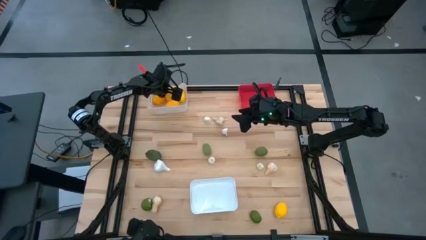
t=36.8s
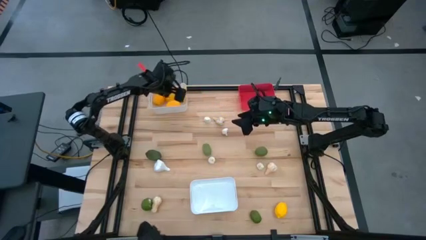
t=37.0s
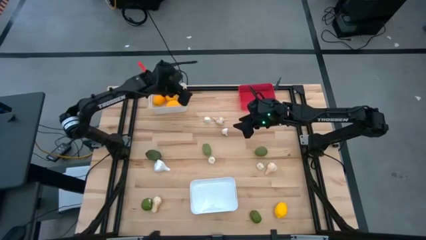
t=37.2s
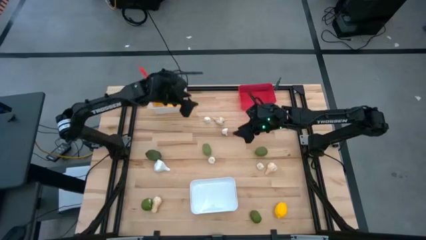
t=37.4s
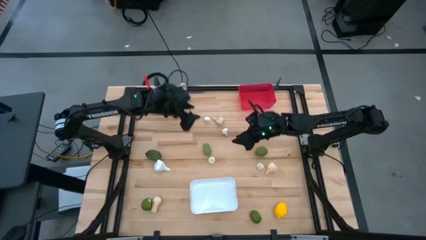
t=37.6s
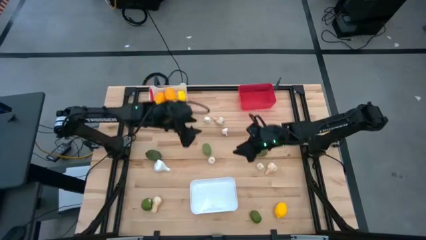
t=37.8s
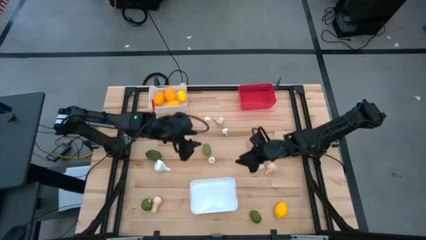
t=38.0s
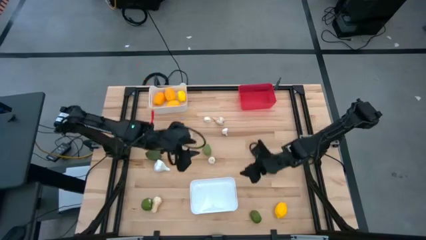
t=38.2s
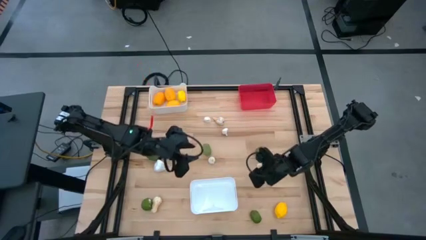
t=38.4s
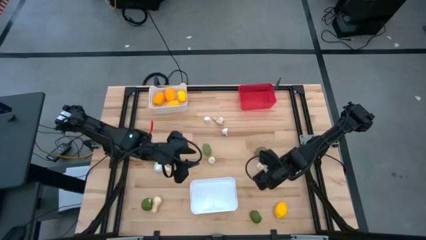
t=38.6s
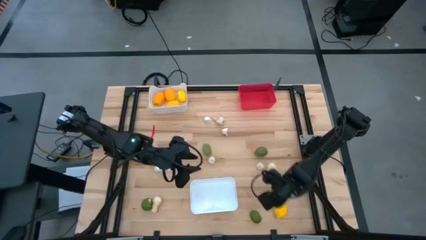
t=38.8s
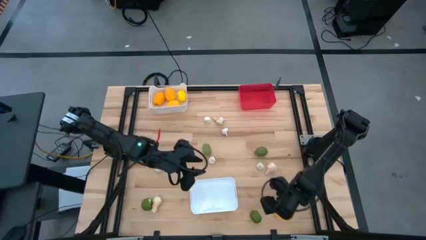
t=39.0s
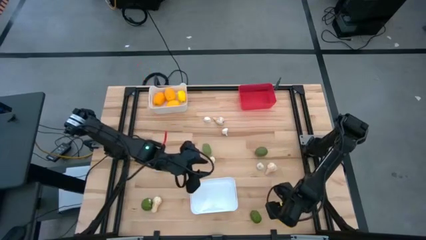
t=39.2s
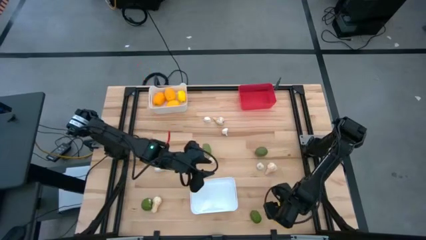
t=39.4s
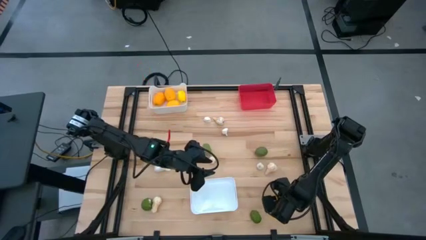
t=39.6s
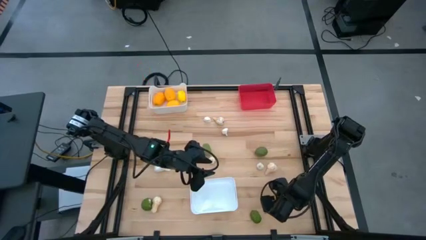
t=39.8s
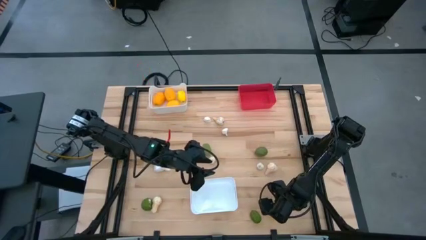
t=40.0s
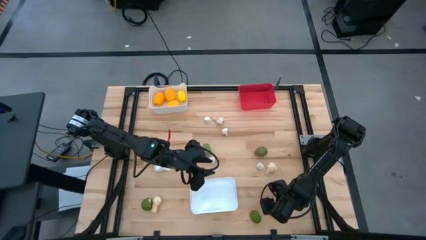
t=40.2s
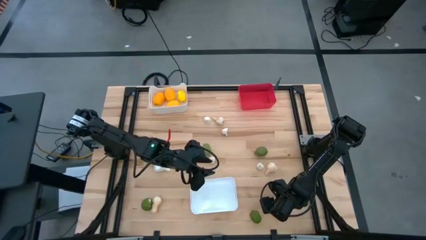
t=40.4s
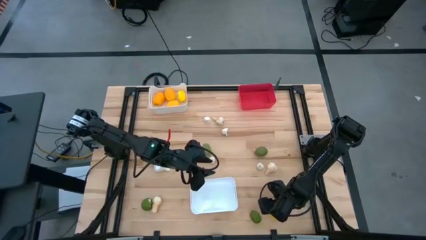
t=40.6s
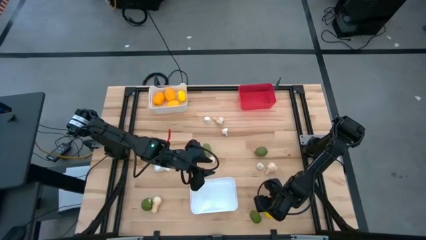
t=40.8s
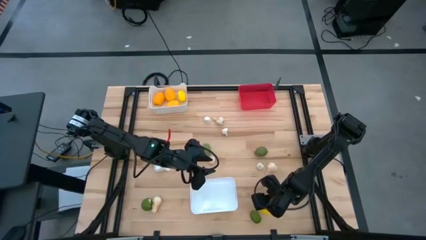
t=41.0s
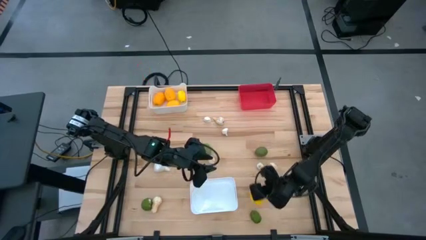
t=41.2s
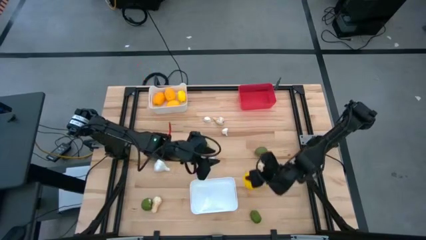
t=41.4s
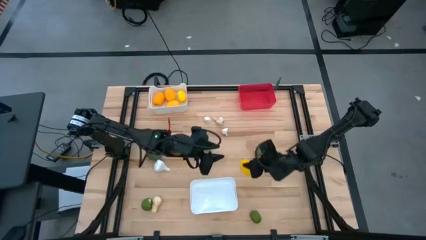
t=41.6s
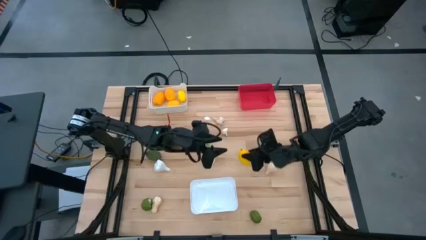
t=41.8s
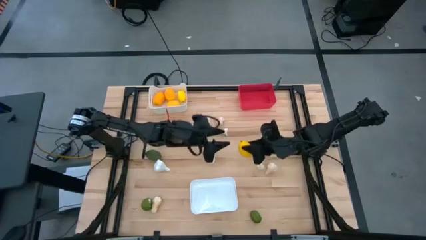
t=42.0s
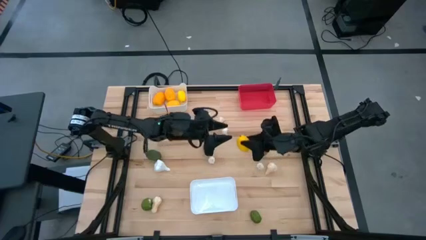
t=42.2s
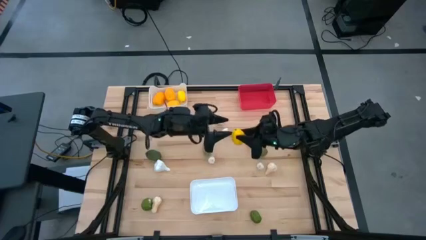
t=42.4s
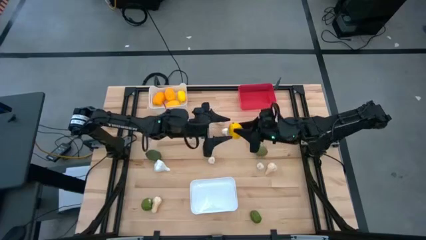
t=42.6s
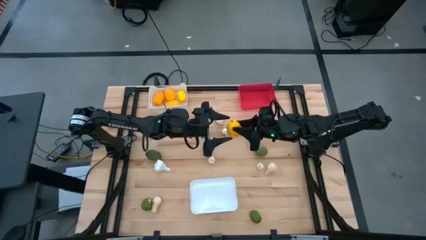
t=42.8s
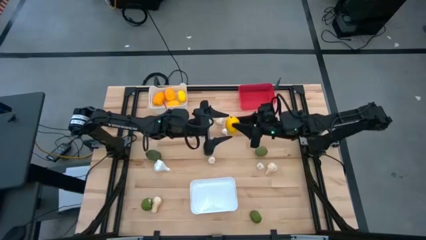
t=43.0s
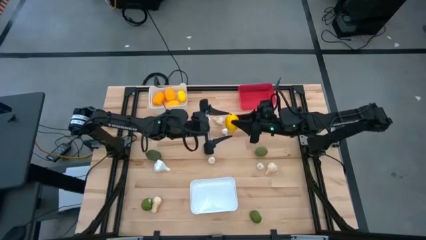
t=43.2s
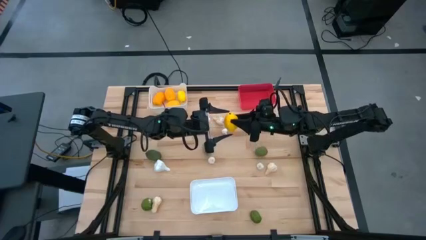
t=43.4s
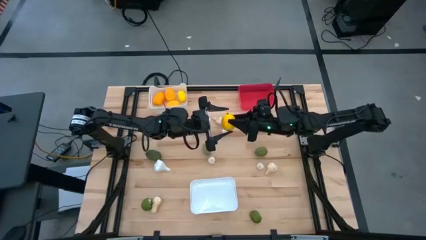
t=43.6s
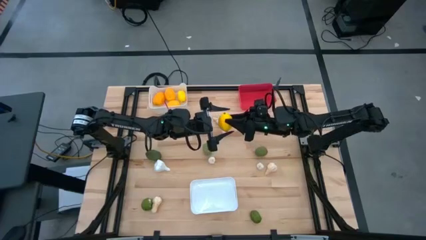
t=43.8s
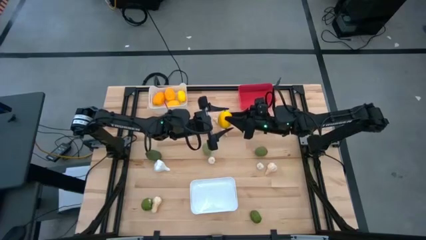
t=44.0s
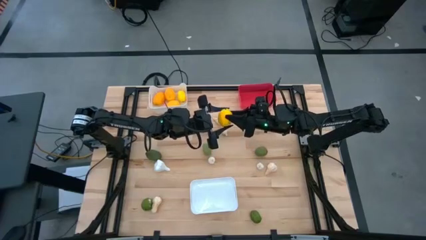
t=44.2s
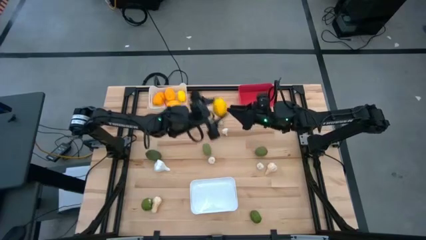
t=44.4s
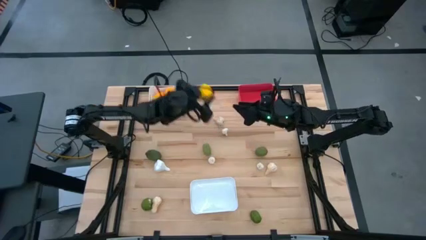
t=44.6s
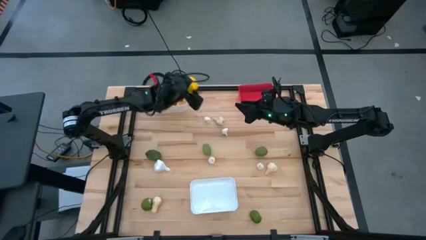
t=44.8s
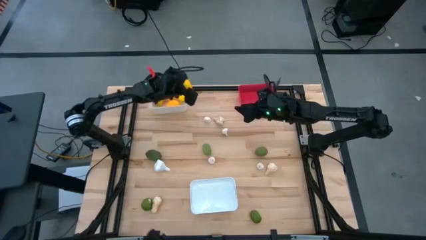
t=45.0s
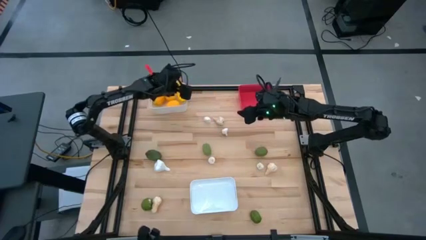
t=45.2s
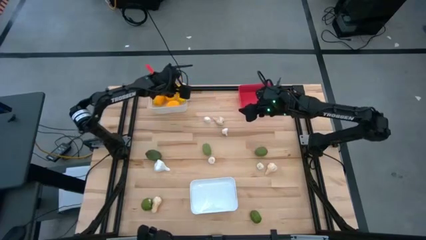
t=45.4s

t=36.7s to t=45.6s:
Task: Sort produce into baskets
Put the yellow lemon into the top white bin

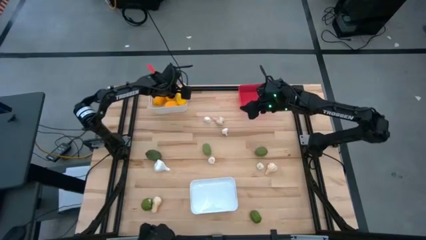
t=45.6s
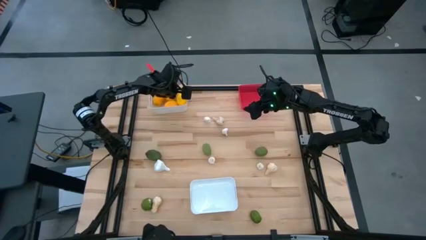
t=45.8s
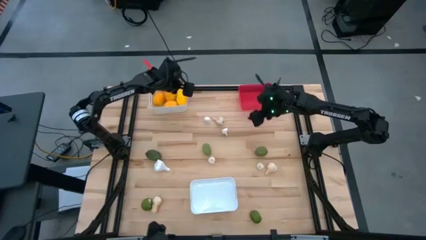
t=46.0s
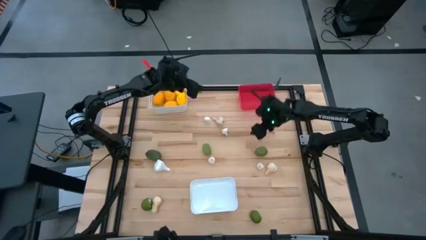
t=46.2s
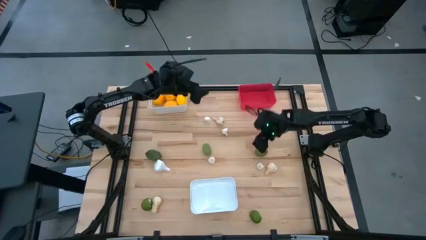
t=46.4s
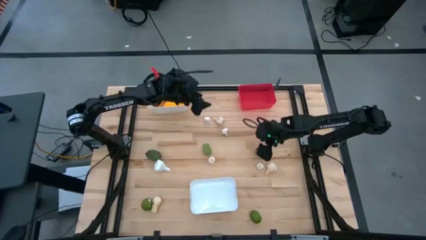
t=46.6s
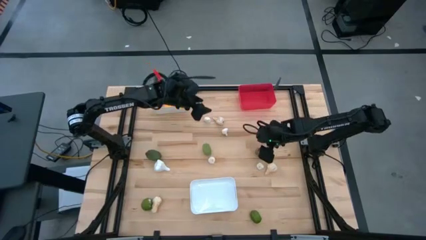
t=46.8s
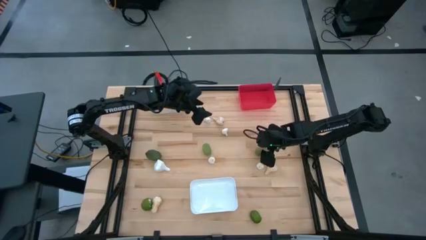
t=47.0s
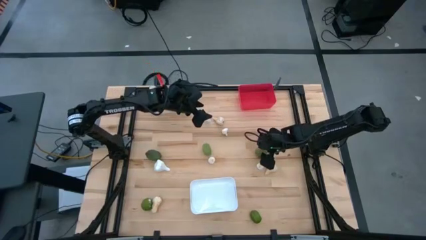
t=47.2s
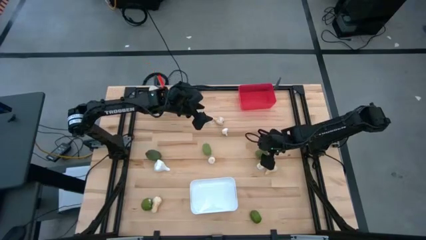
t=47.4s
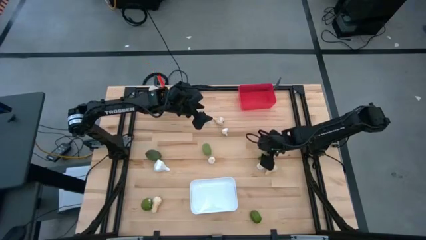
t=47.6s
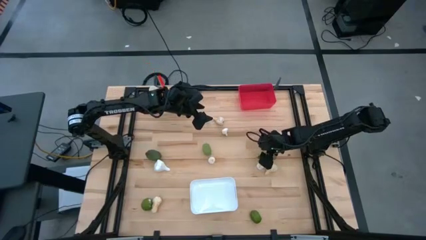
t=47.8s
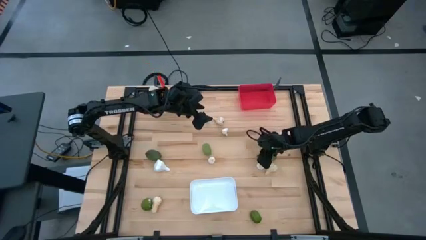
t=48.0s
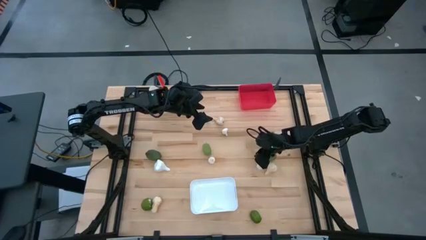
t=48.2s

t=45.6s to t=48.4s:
Put the green lime into the red bin

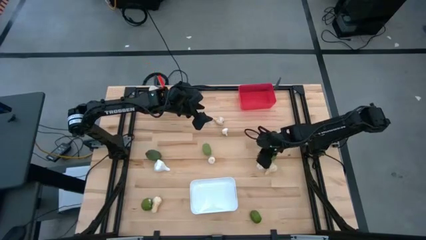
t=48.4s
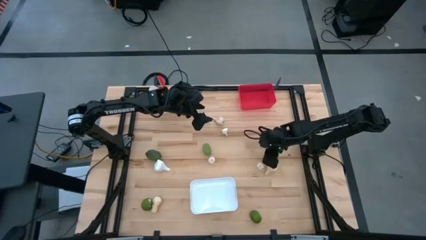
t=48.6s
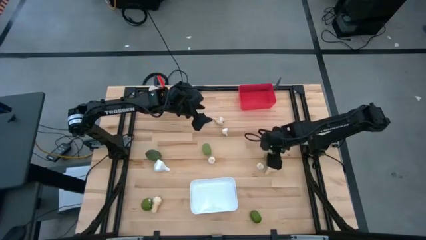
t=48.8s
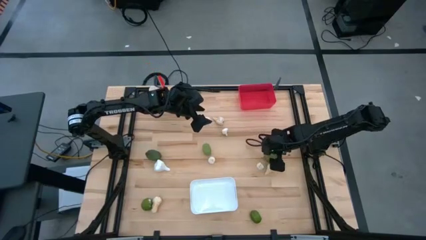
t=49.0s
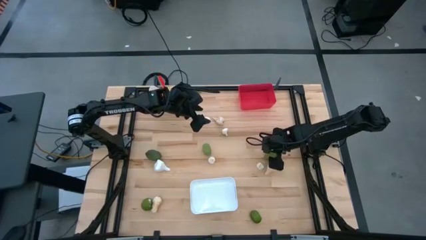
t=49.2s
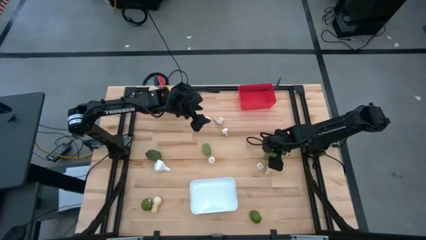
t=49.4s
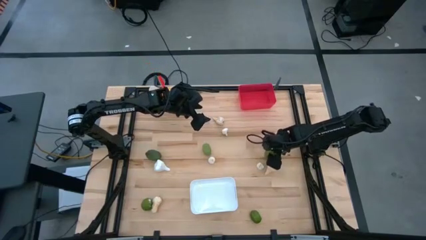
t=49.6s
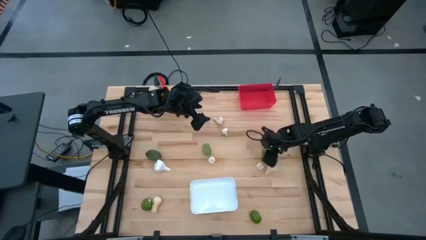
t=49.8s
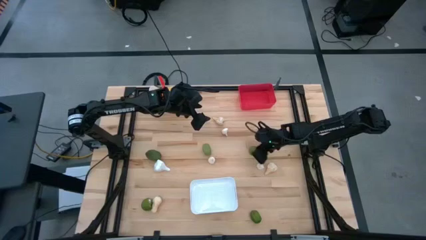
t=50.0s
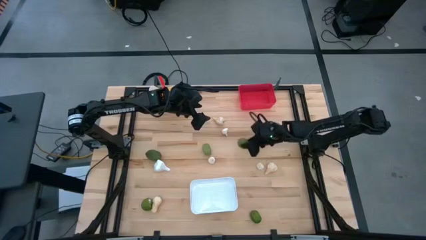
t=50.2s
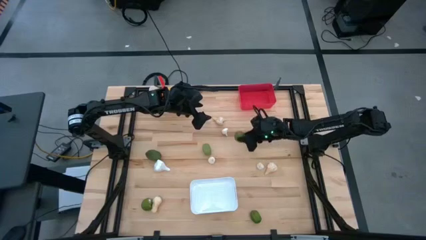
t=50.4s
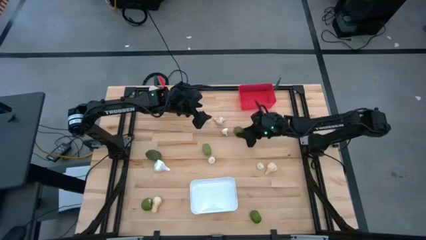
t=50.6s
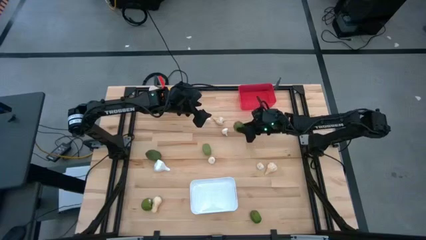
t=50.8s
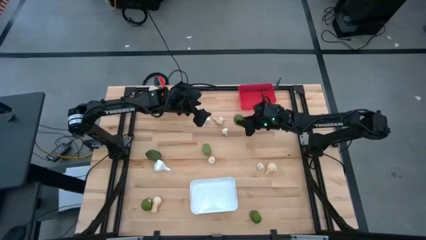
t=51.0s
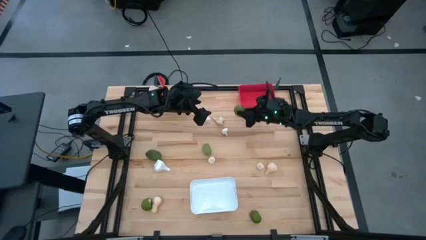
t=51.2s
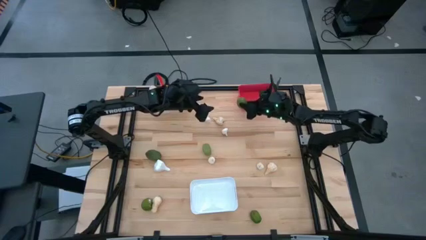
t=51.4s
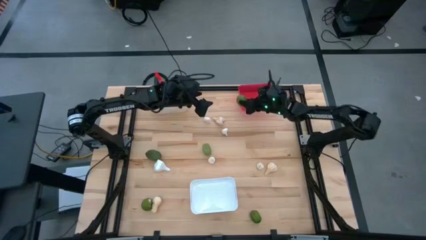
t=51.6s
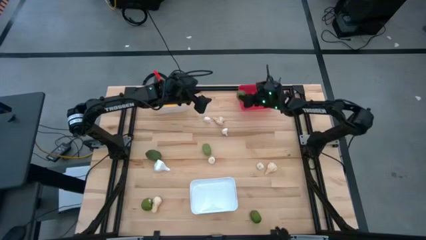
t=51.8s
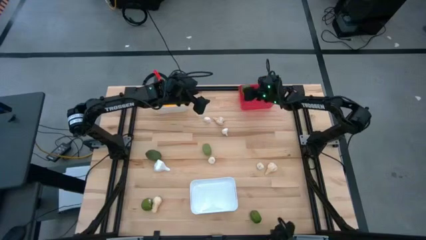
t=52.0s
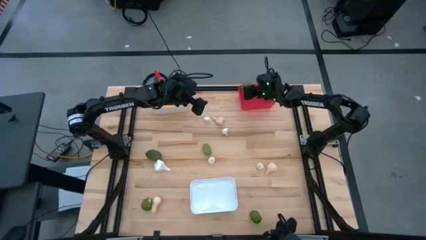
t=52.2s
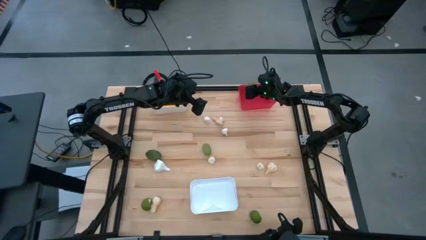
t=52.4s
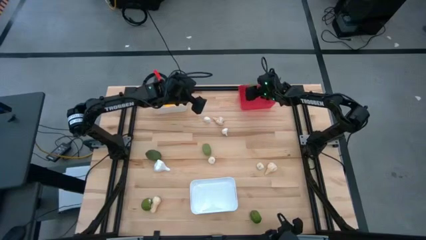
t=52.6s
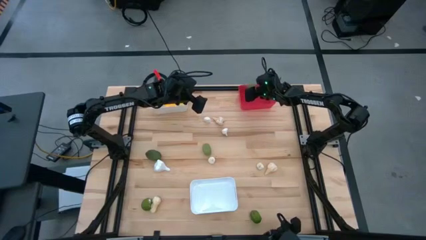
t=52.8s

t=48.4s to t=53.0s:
Put the green lime into the red bin

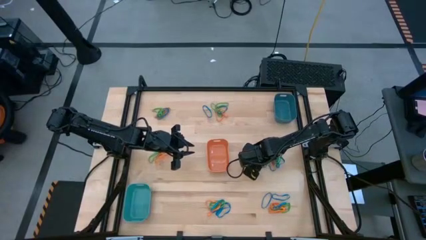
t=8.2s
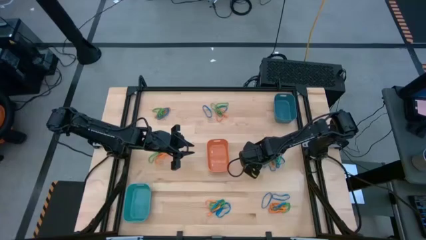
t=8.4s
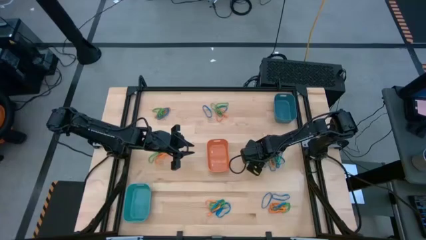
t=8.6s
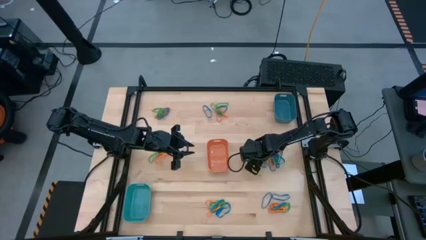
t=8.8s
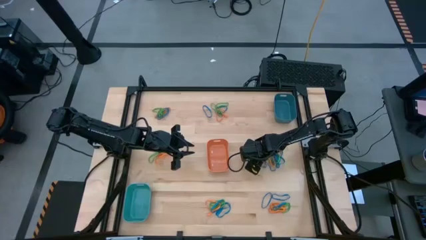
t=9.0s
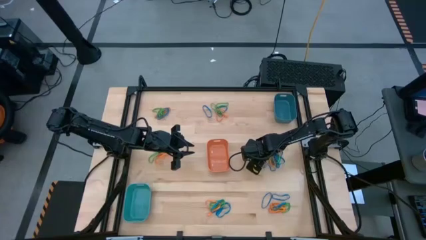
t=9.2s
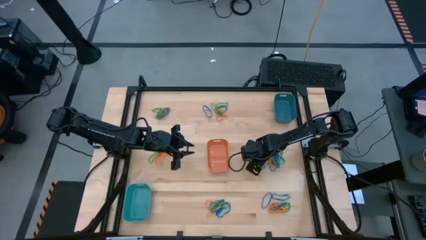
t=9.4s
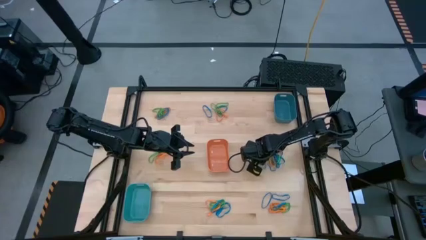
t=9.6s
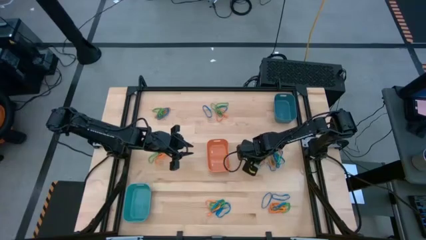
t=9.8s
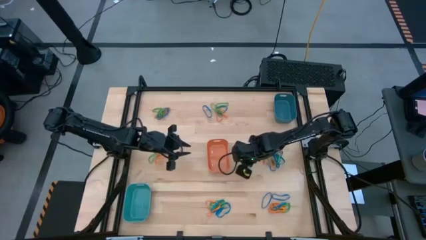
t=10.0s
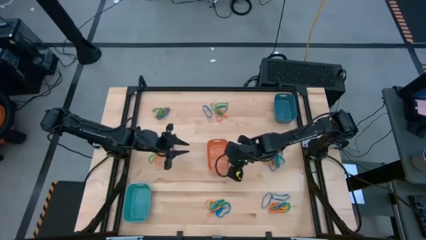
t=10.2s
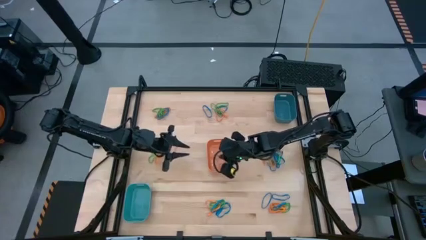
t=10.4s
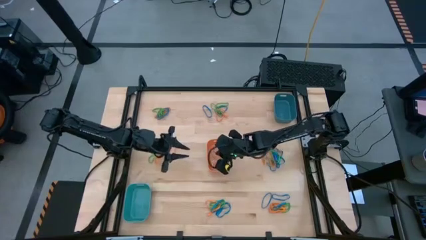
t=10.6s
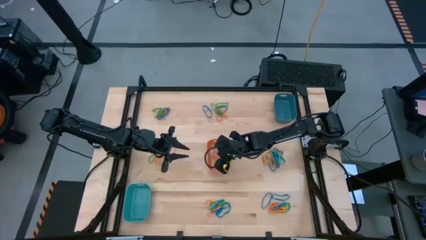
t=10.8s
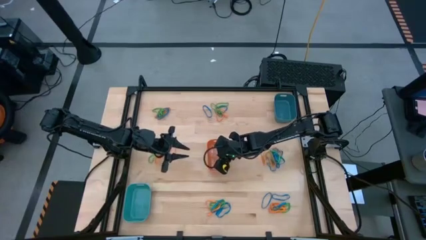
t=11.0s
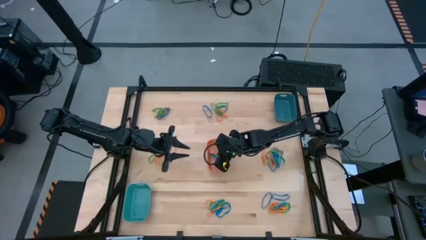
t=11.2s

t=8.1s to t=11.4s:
Task: Sort rubber bands into baskets
Put the blue rubber band into the orange bin
